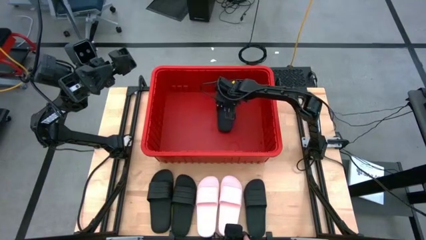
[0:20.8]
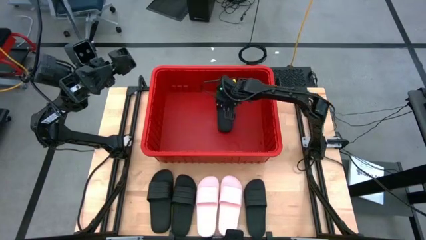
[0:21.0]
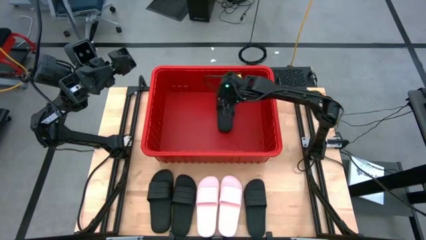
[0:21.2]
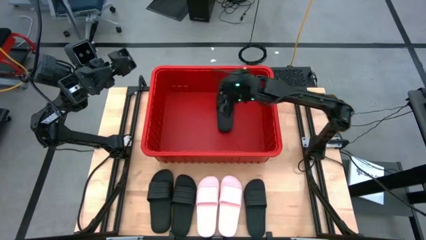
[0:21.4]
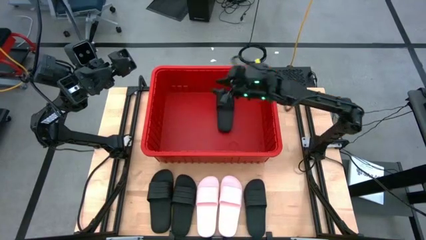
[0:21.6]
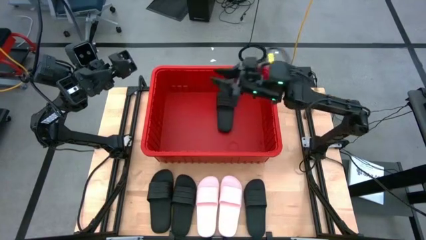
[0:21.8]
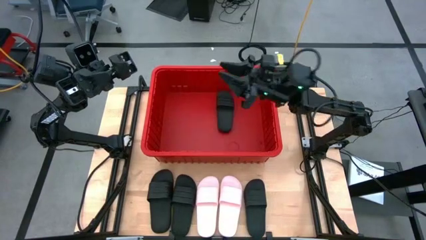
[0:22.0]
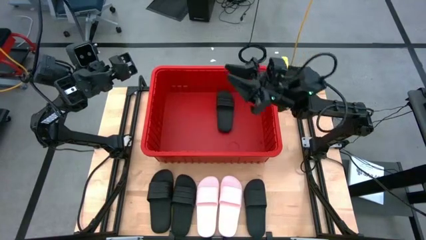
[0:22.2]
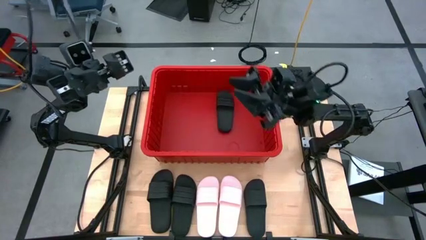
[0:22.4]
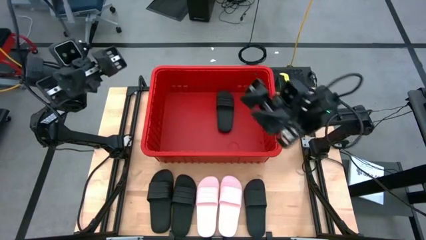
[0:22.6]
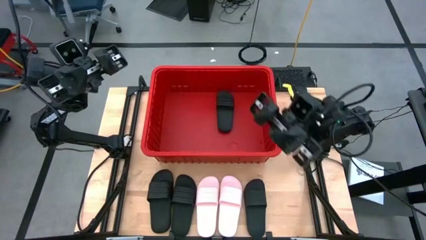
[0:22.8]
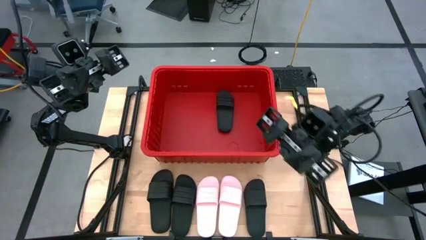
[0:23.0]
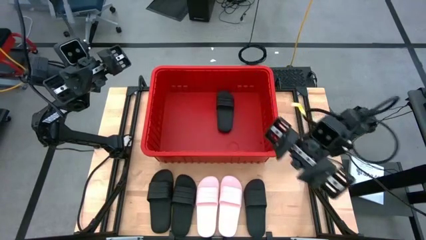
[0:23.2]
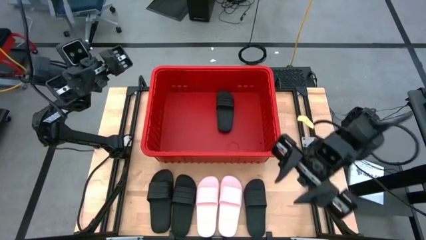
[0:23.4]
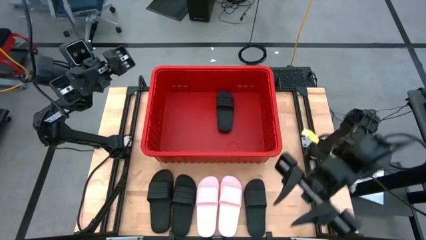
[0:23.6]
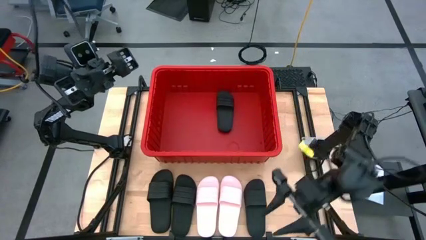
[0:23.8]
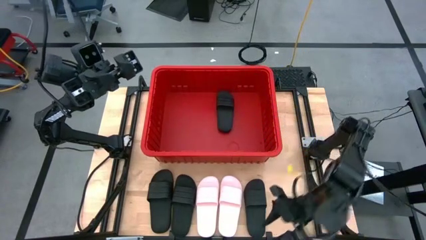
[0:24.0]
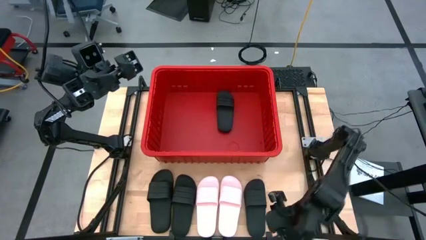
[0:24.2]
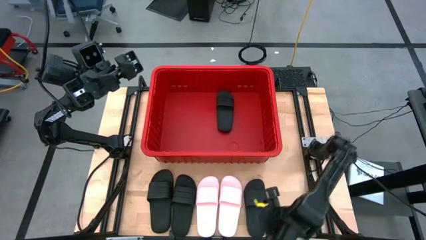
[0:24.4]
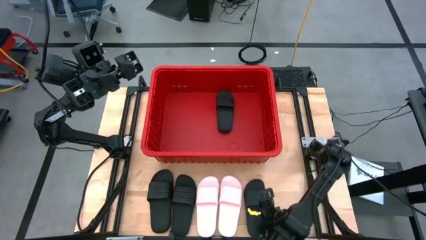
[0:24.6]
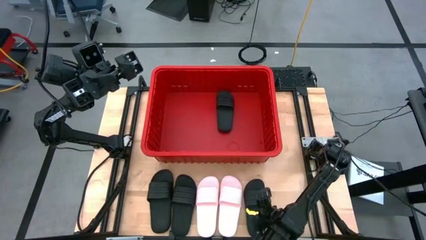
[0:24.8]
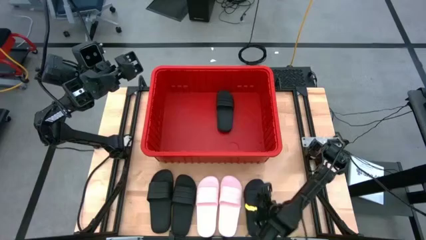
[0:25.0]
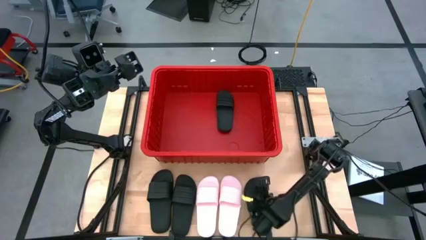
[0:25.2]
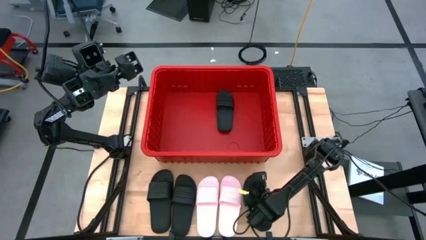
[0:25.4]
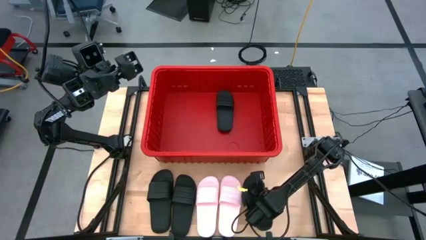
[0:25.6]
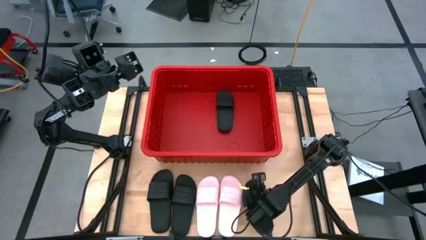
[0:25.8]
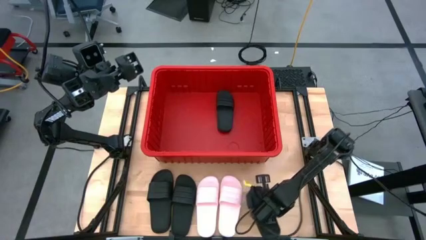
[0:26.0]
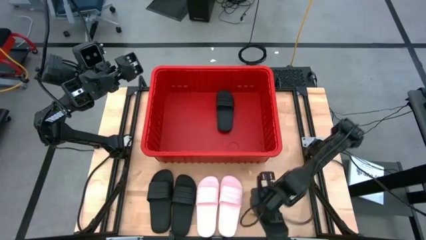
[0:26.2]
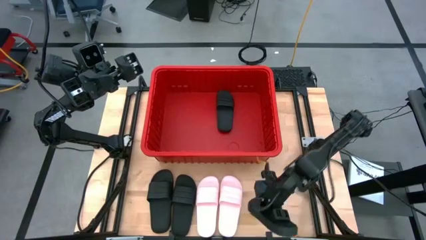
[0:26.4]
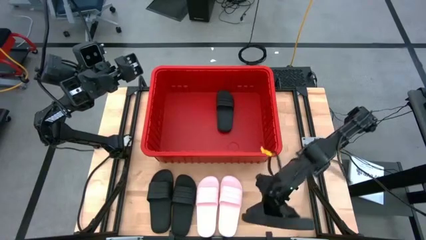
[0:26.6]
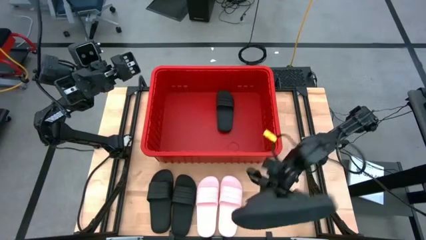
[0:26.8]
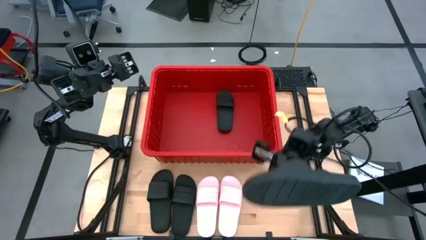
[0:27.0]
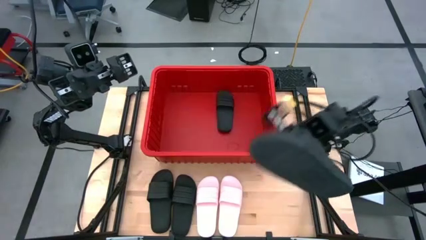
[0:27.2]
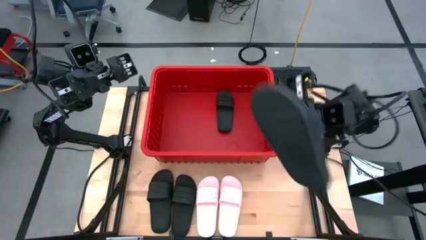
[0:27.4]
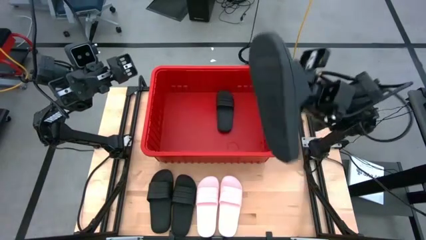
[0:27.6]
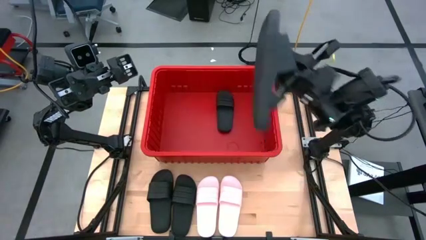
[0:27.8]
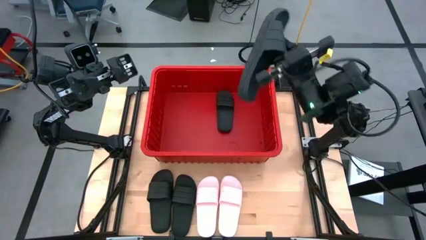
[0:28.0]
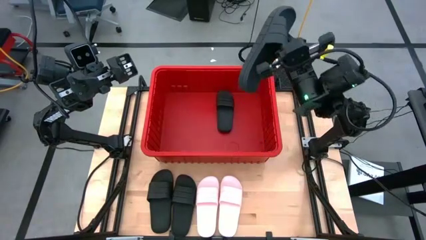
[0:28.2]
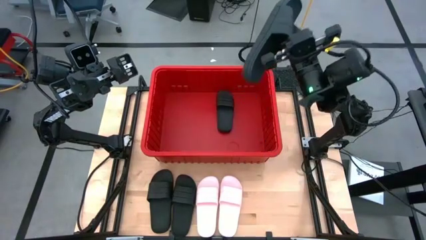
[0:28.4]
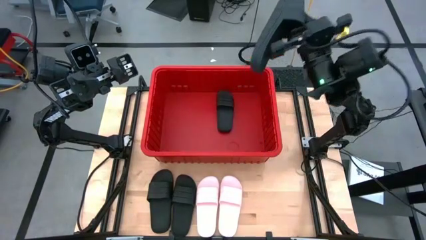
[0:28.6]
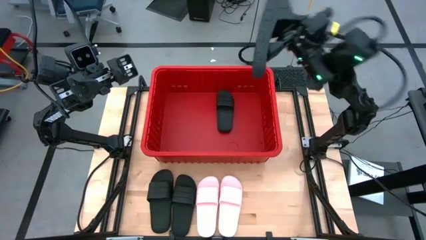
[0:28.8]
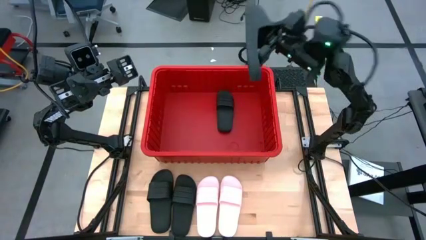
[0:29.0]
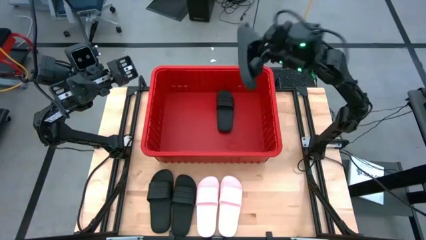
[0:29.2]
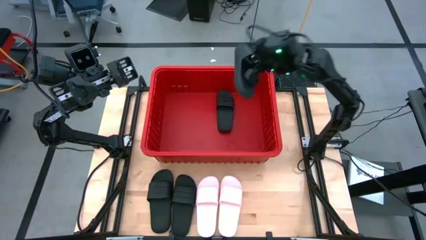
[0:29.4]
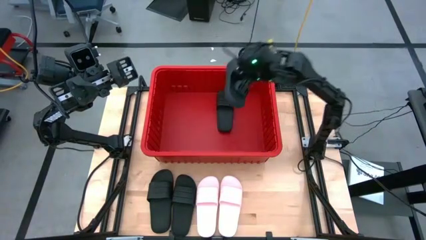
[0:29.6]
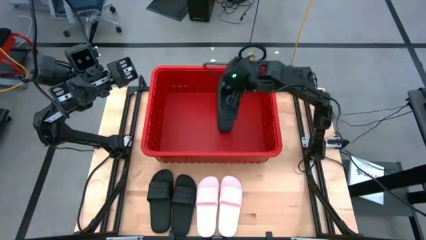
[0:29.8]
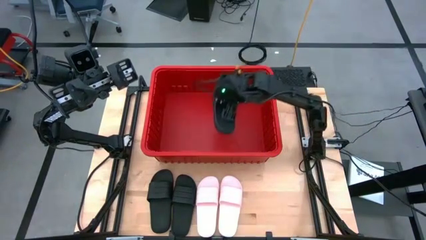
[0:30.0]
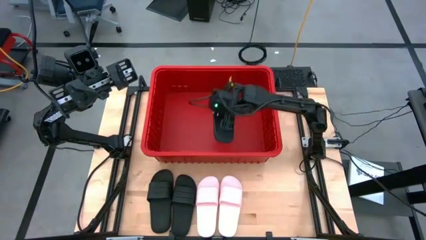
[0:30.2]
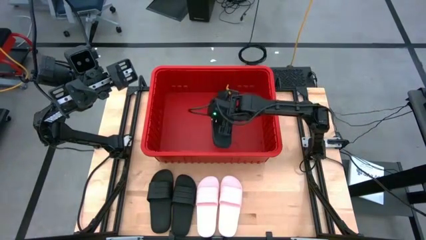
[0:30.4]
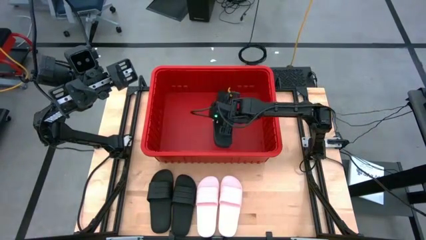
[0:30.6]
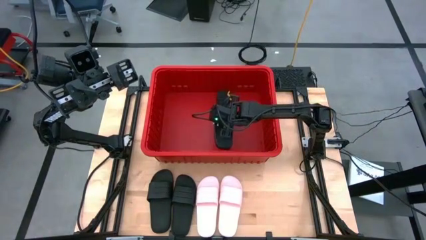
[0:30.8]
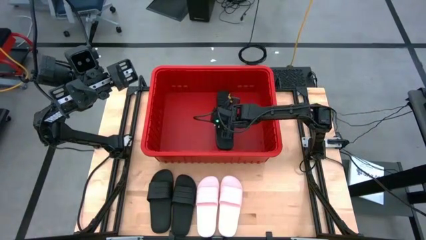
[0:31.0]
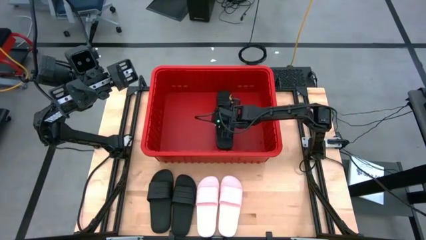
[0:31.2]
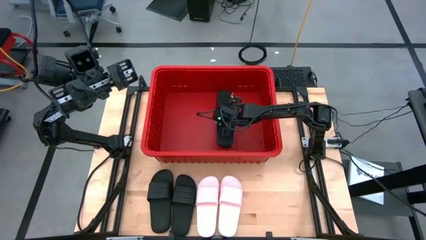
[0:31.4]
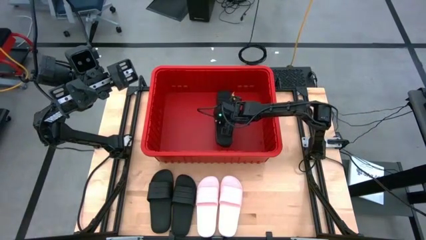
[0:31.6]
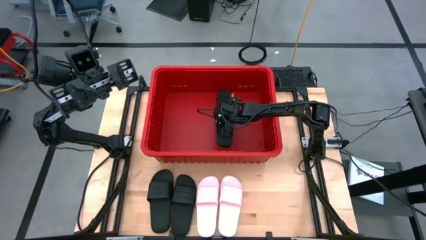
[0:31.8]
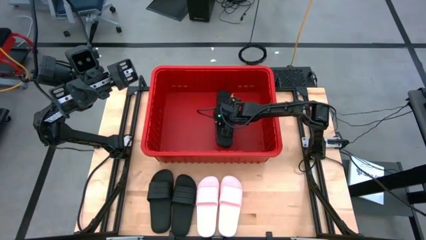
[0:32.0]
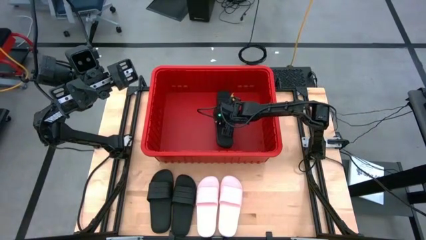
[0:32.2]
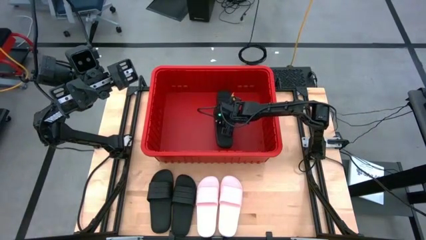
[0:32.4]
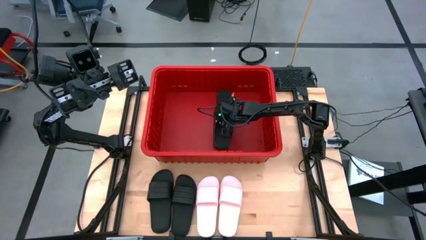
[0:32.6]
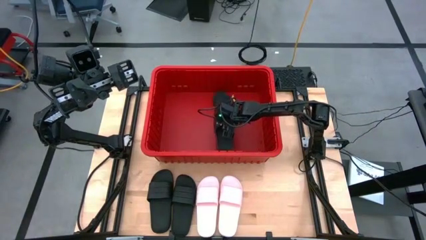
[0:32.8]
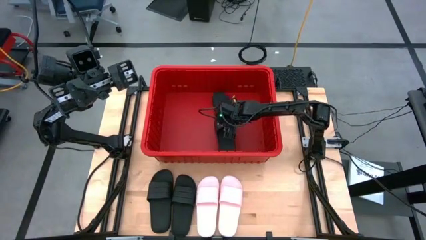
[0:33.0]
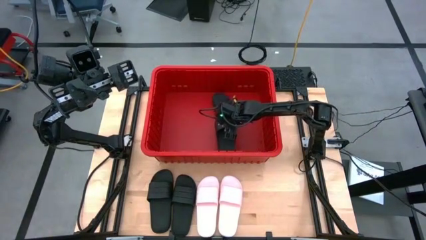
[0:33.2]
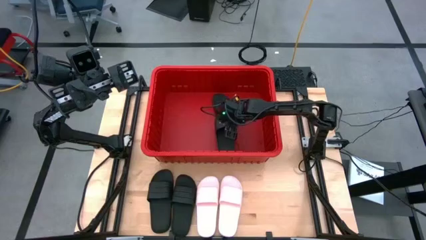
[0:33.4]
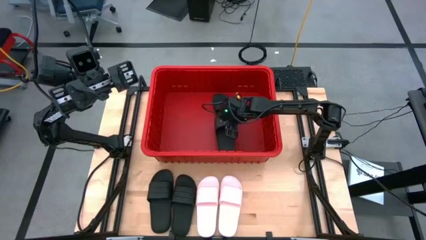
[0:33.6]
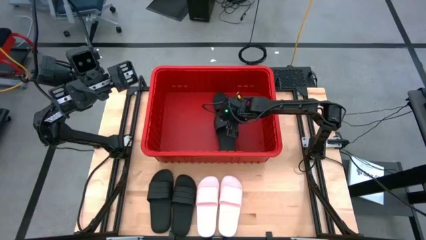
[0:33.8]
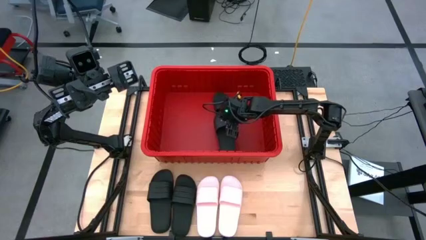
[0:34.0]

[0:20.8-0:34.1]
Task: Pick and place slides into bin
Put the black slide into the red bin

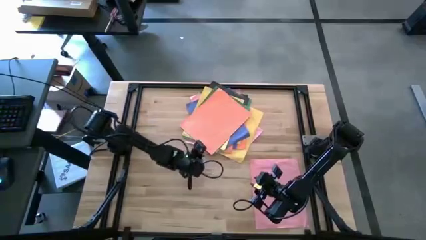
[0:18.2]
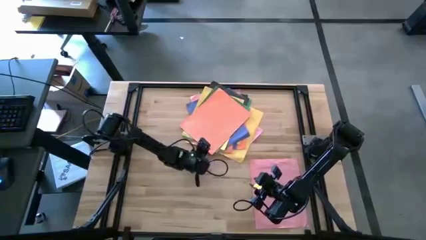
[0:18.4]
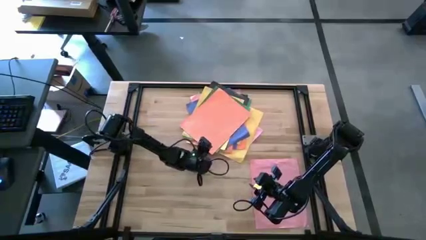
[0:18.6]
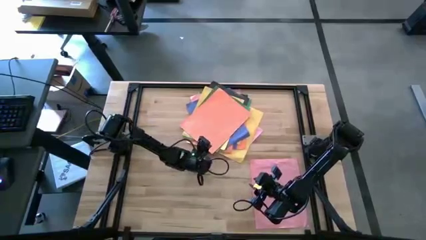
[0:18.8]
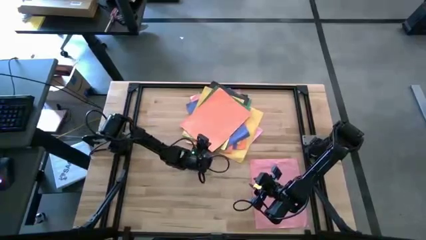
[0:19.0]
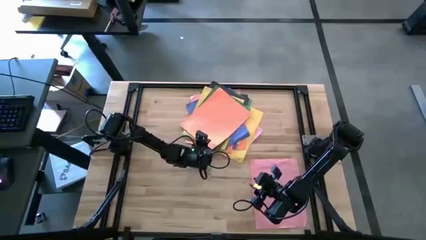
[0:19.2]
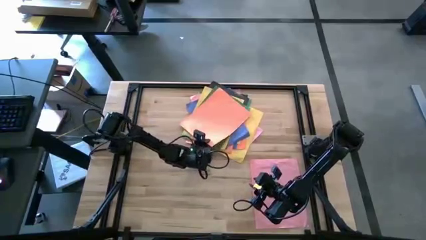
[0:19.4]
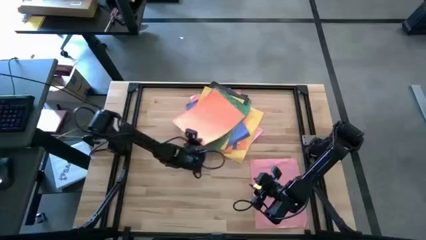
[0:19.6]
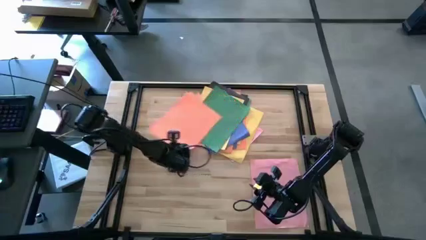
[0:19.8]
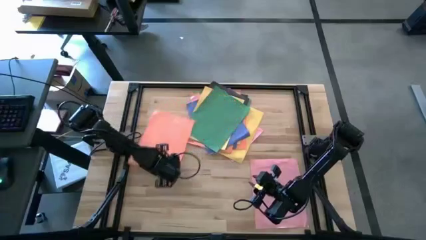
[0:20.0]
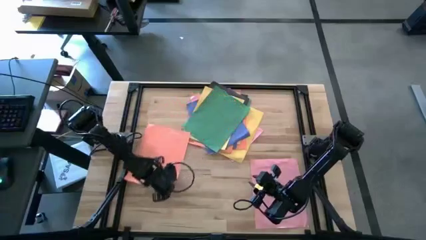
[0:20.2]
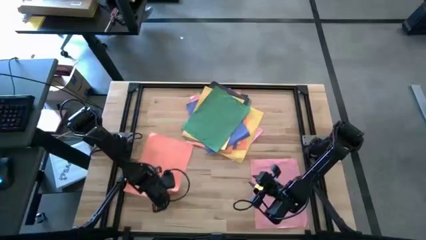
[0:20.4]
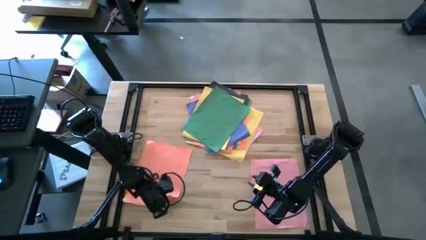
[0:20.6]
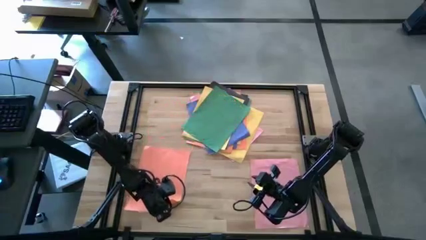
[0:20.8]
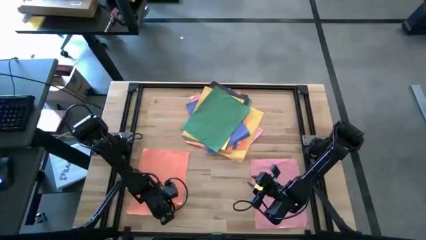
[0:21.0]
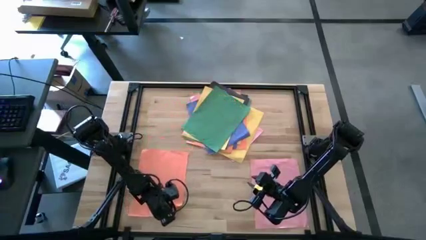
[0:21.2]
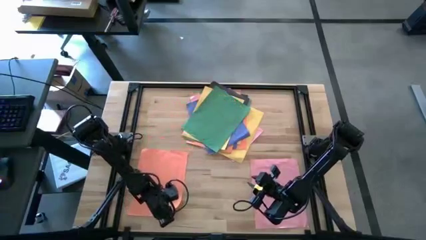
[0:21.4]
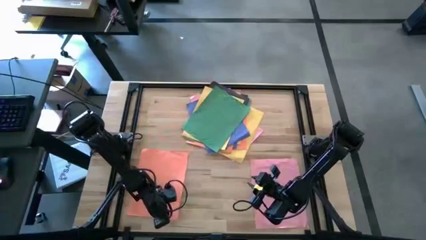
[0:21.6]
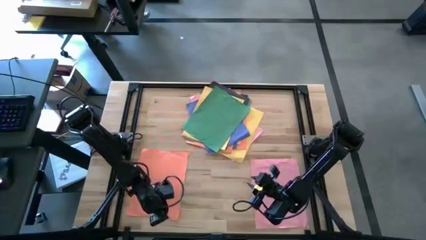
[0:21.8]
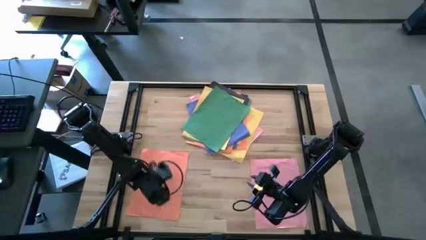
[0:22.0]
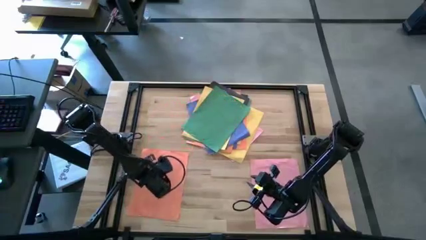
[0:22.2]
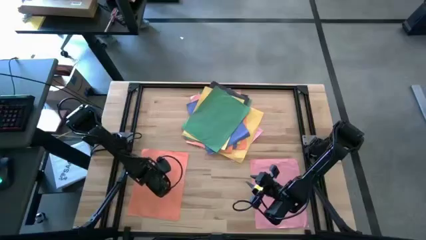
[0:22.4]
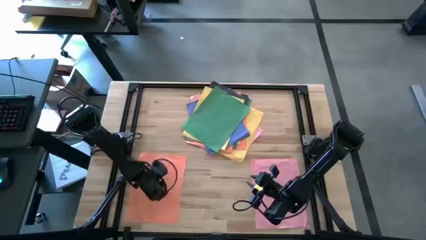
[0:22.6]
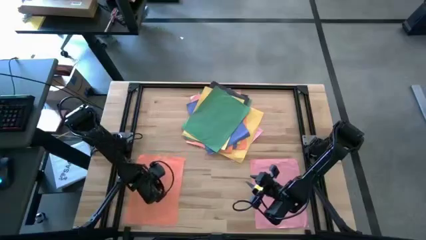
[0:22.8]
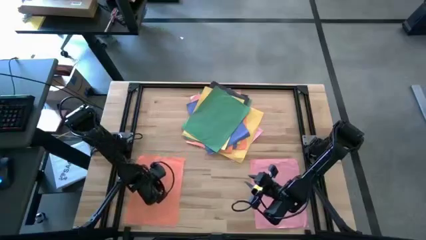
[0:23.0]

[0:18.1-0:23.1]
Task: Organize paper
Move the orange paper to the lower left of the table
